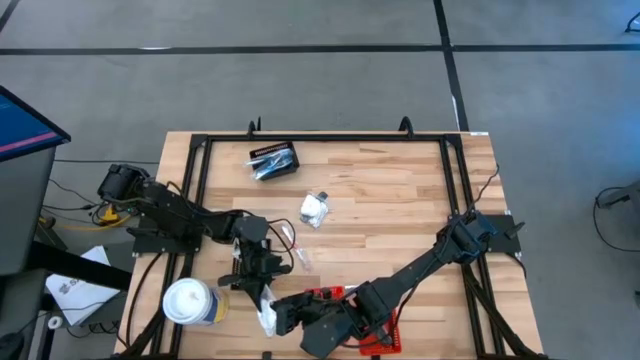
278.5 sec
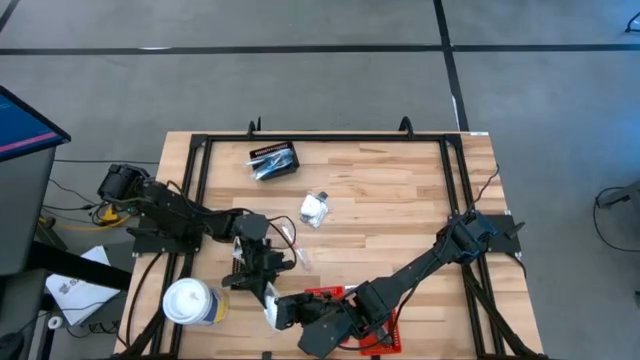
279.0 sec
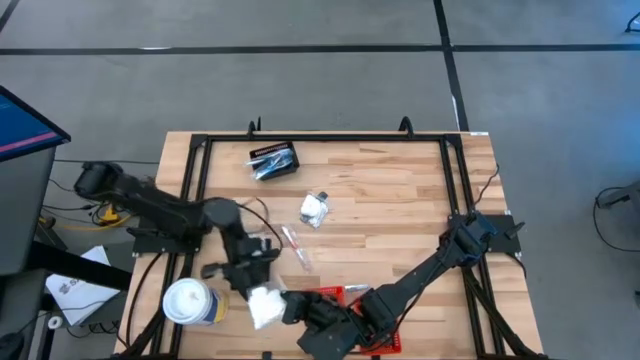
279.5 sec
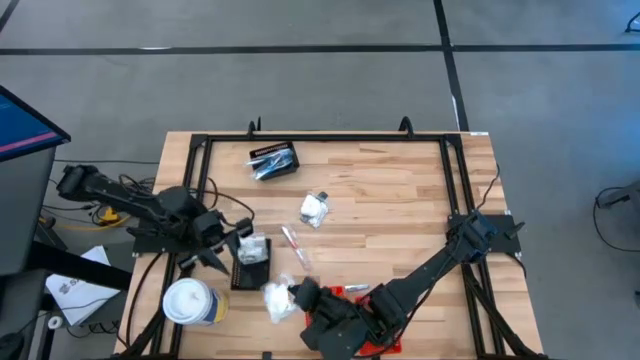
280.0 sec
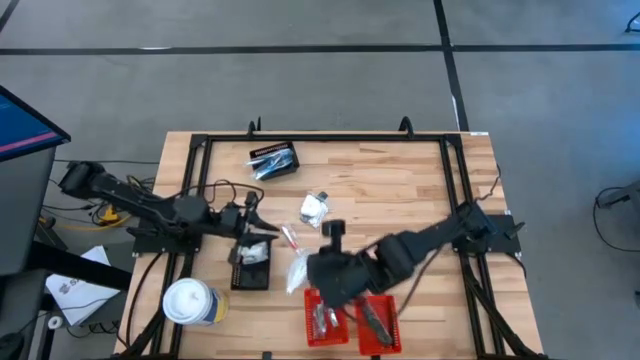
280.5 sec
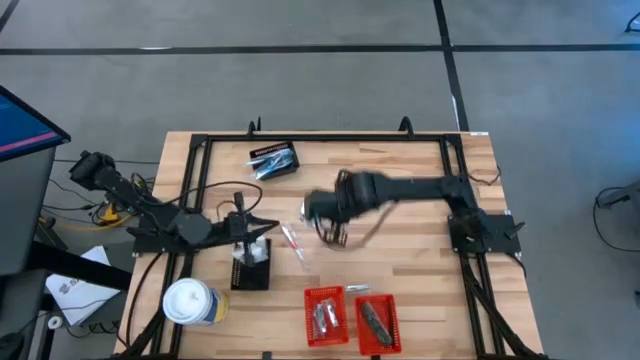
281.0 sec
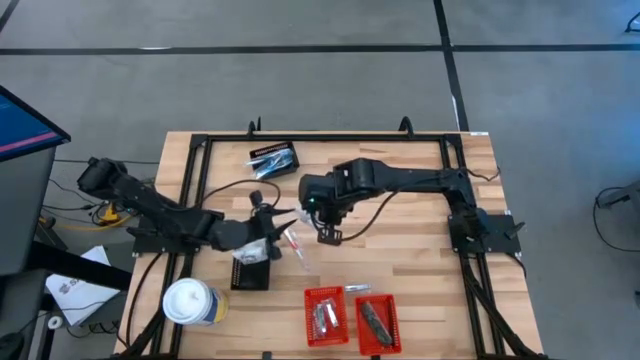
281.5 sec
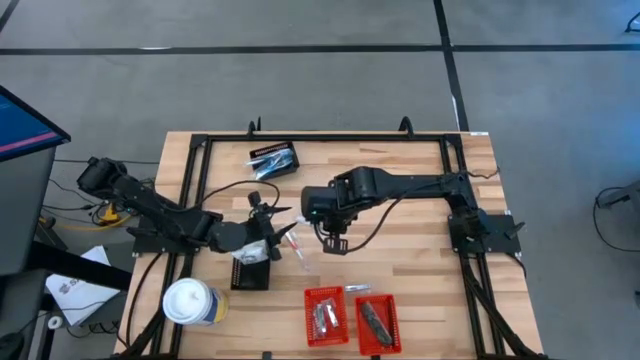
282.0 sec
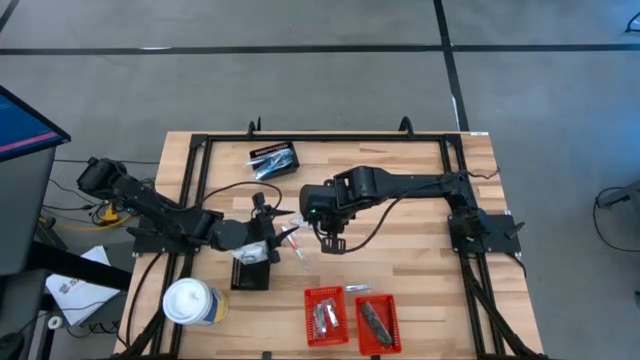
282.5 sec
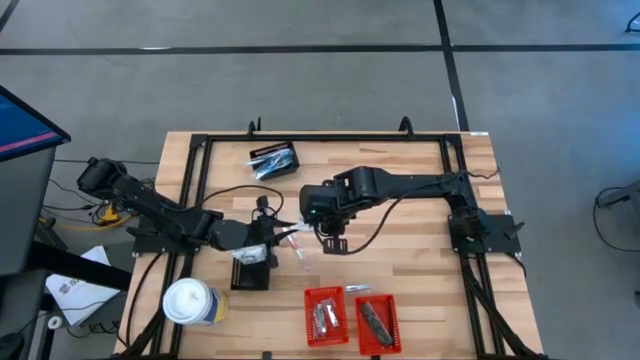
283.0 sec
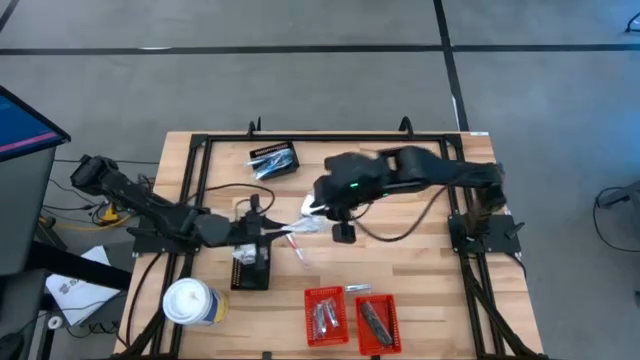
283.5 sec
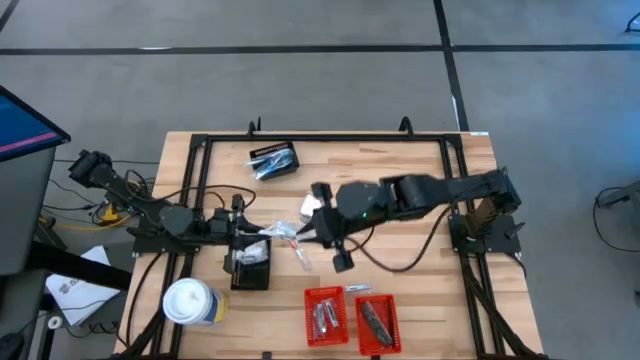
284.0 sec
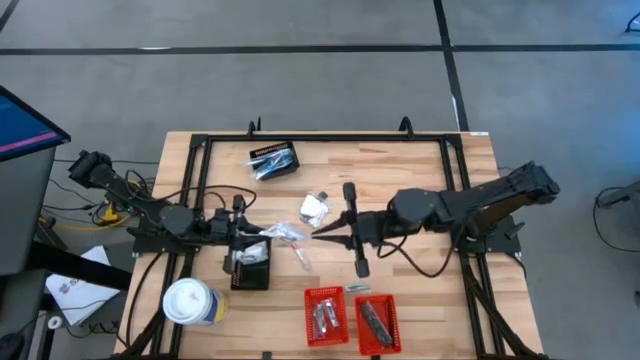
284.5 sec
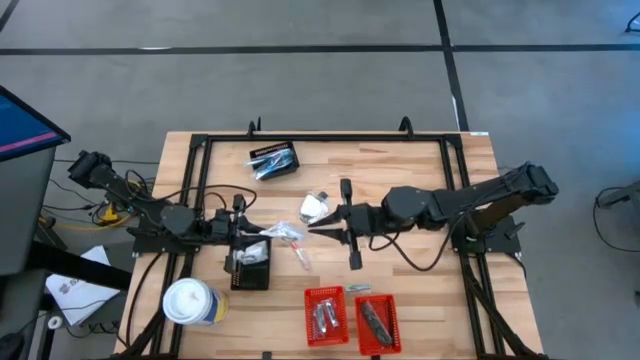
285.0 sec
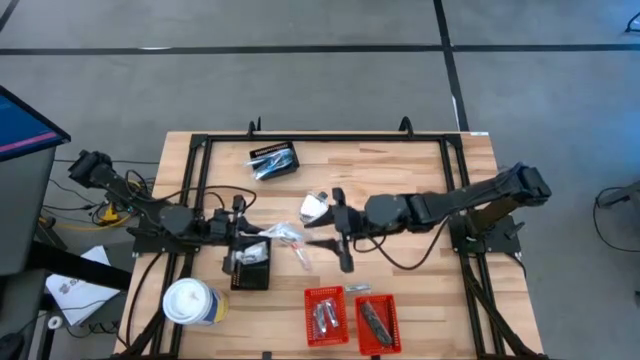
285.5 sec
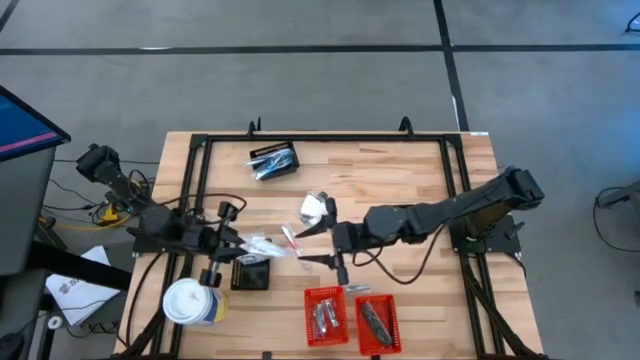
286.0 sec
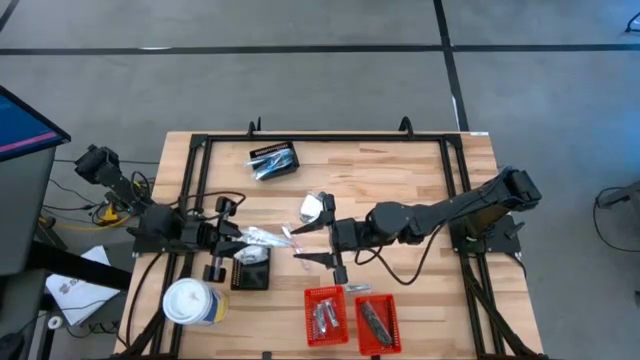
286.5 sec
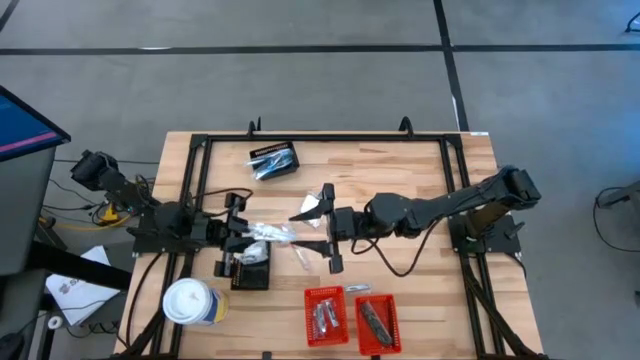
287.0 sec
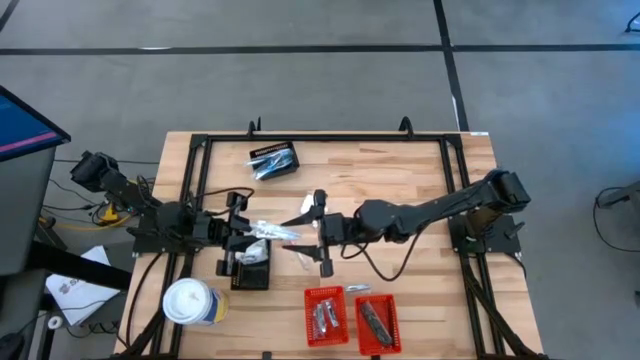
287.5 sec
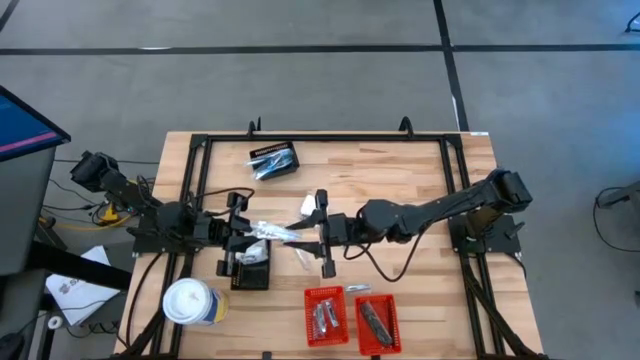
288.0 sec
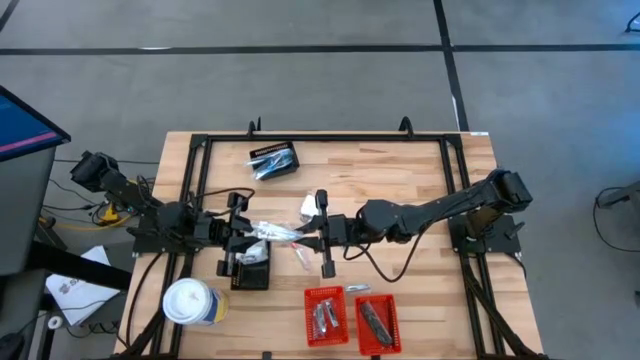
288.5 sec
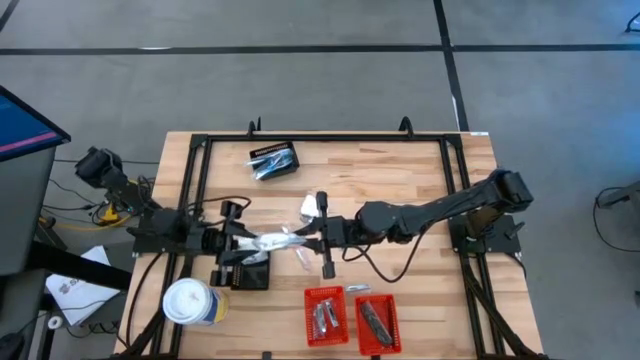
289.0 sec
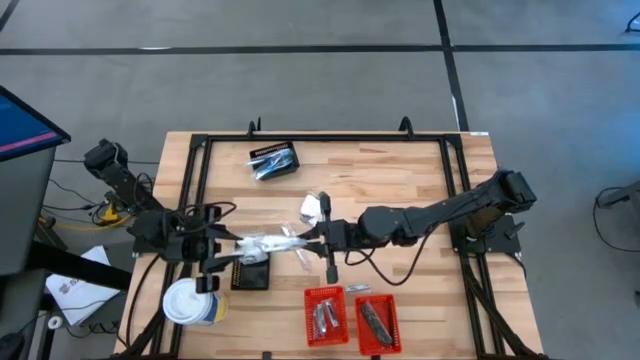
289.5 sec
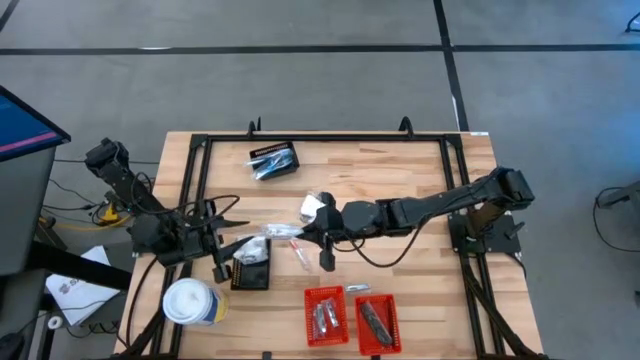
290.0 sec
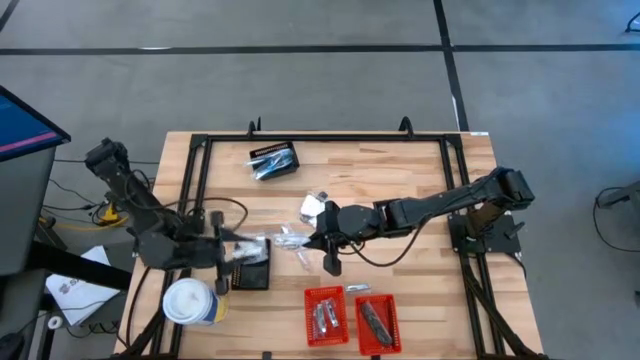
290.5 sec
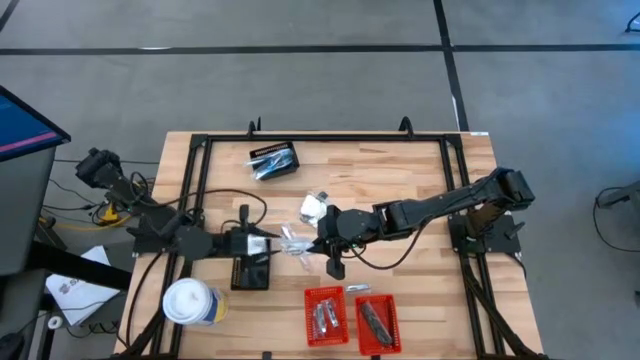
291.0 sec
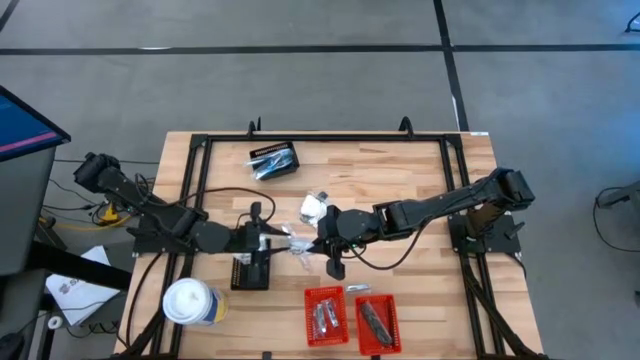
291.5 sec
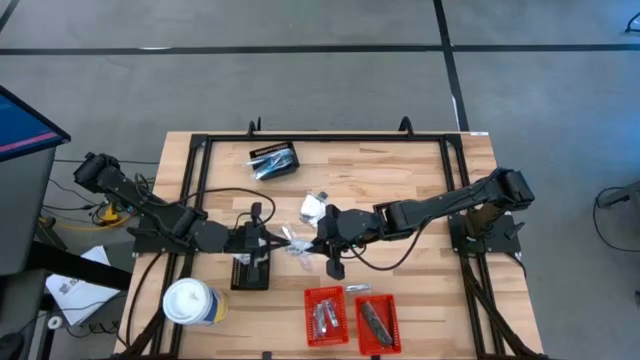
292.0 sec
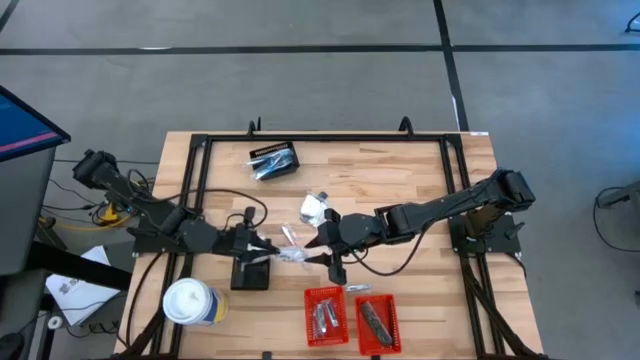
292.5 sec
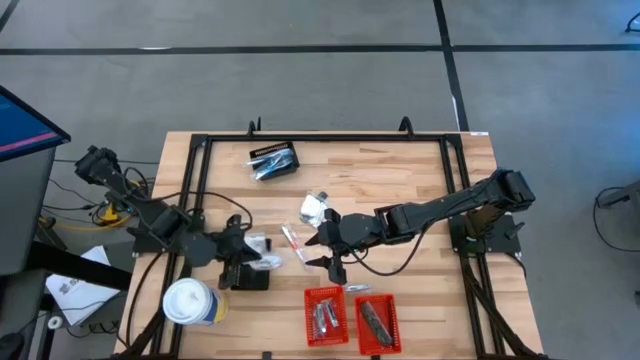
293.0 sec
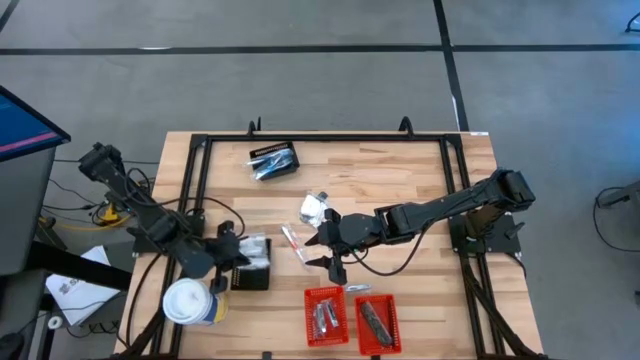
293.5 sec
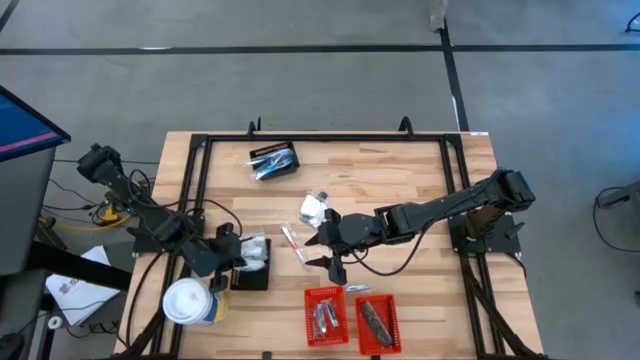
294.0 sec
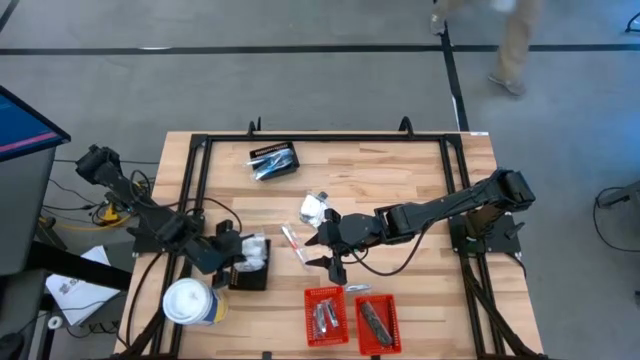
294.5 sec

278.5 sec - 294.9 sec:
Task: Pick & Place Travel size toiletries
Put the cotton pack into the bottom black bin

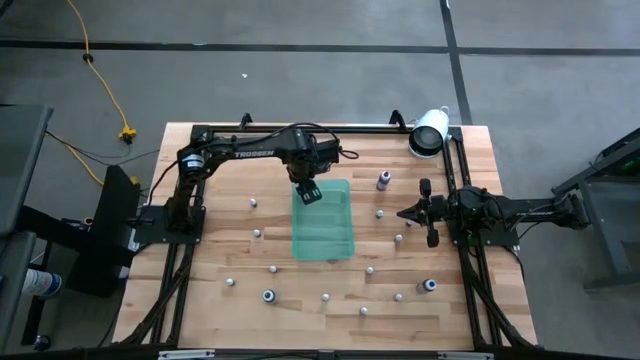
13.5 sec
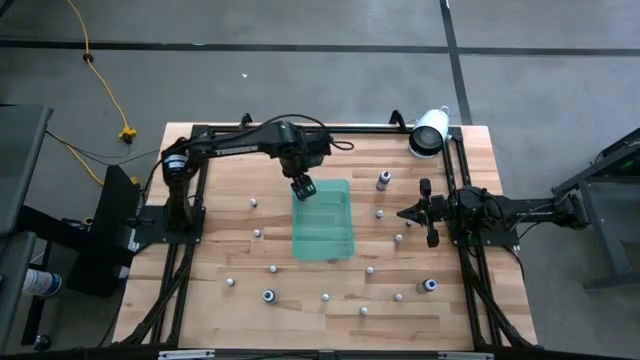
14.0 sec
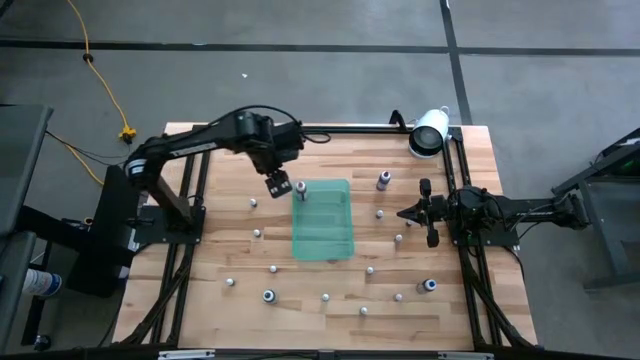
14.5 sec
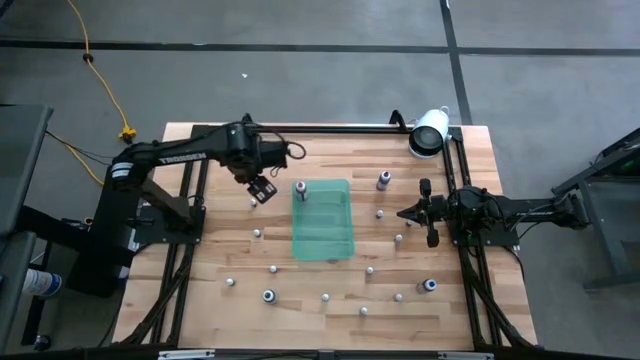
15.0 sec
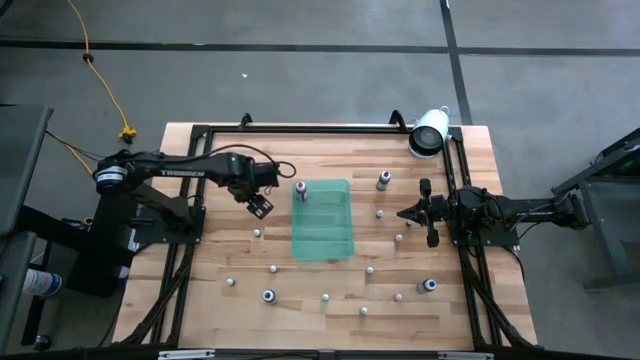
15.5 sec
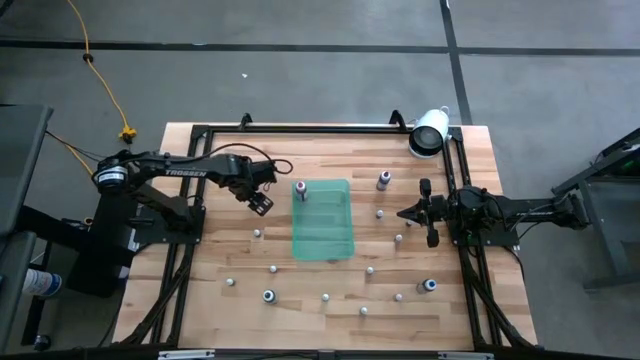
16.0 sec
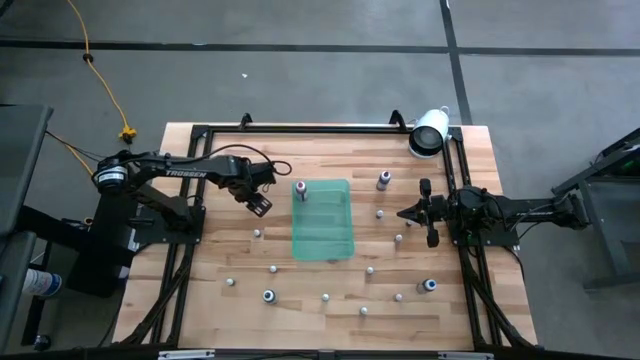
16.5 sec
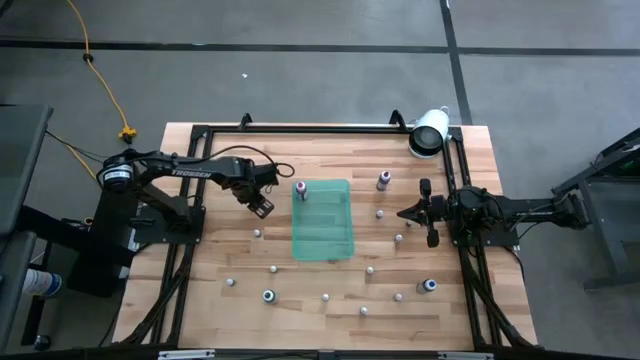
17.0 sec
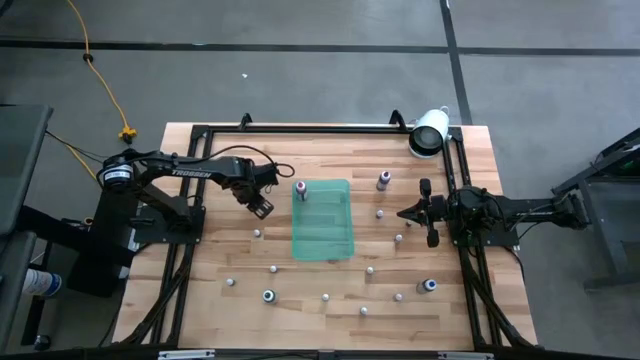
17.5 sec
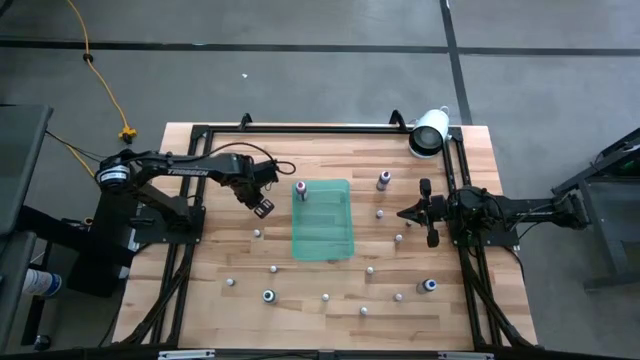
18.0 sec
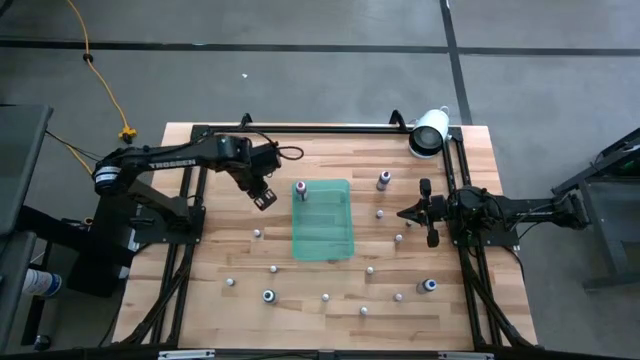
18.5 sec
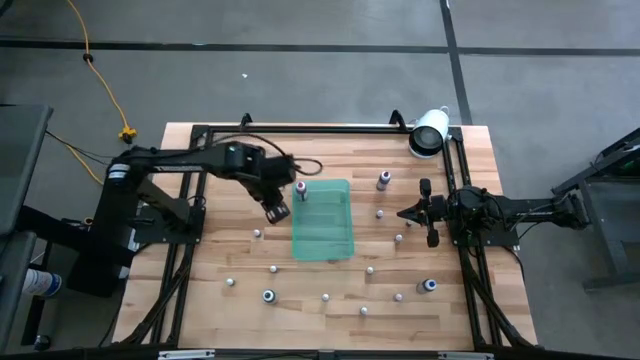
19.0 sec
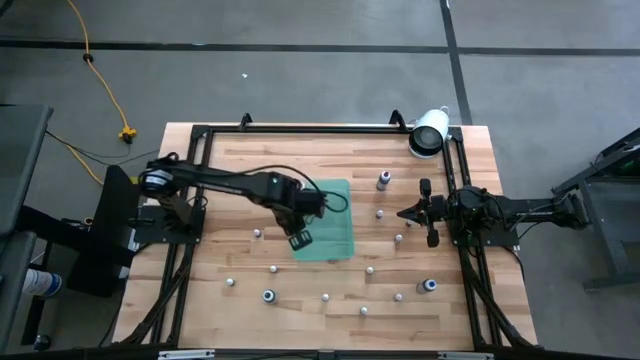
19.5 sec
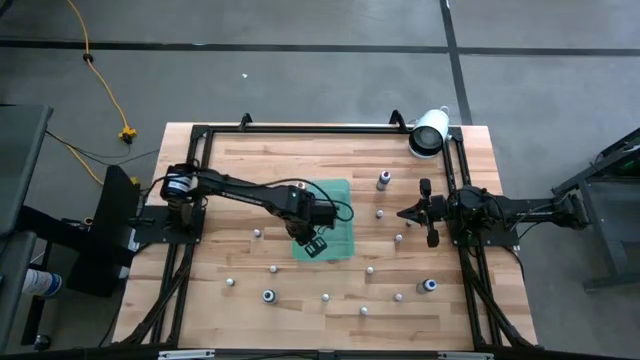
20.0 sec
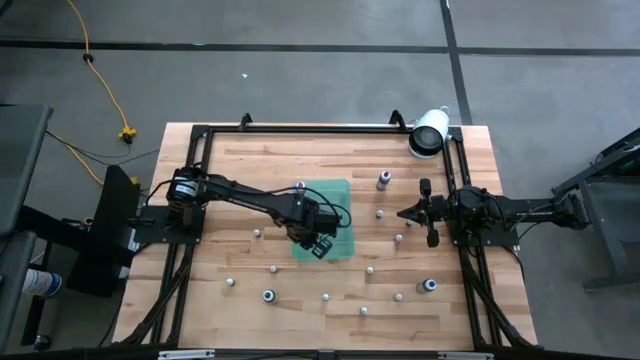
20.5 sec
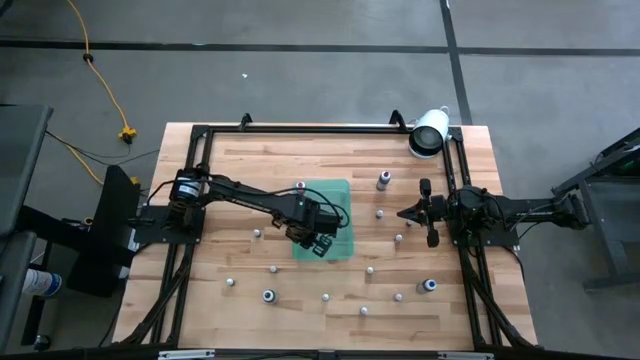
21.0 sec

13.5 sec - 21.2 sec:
Task: Pick & Place food coloring
Put the small red food coloring bottle into the green bin
